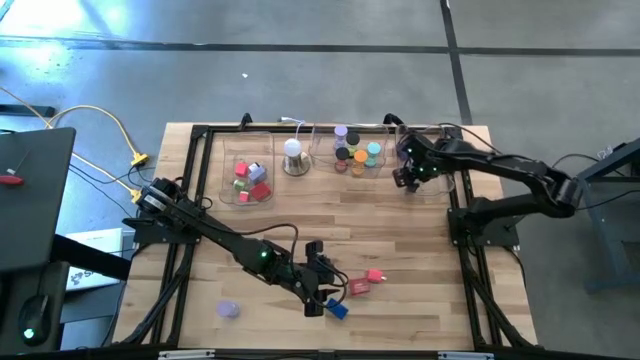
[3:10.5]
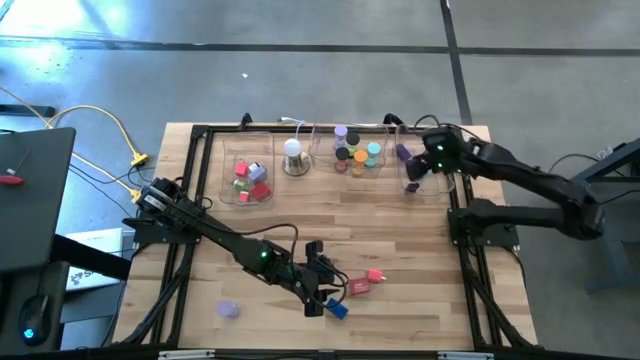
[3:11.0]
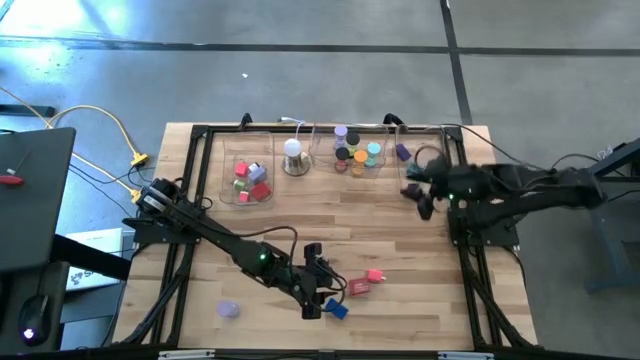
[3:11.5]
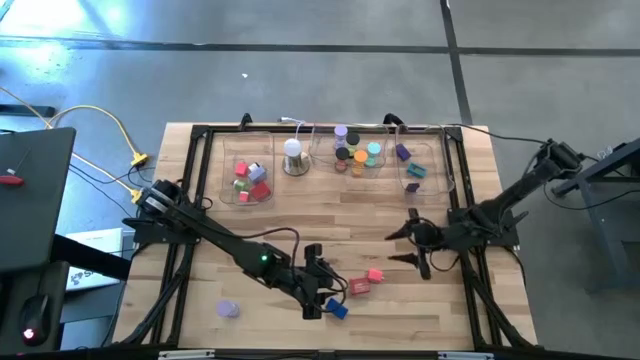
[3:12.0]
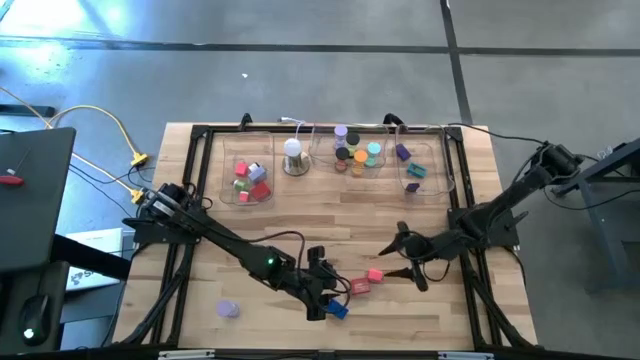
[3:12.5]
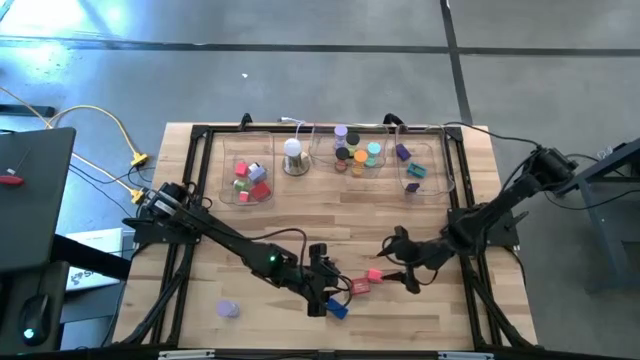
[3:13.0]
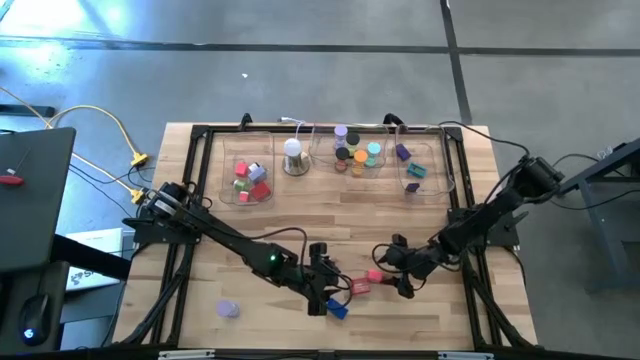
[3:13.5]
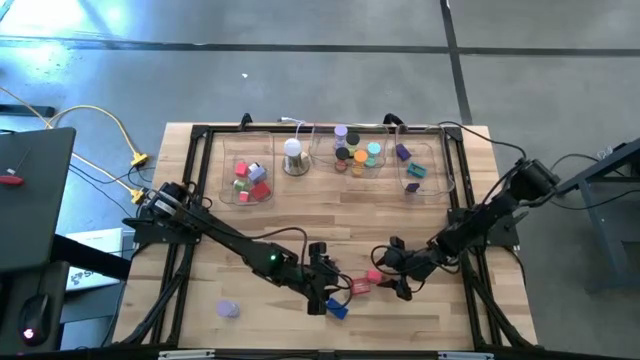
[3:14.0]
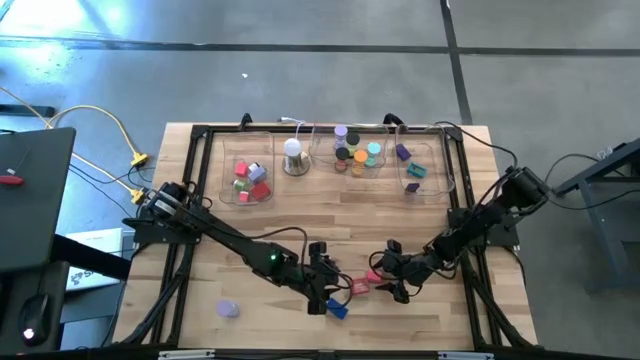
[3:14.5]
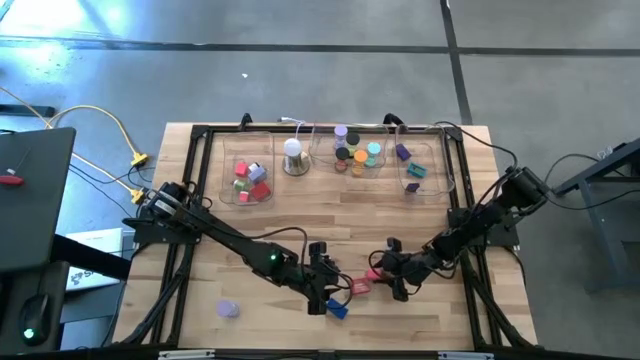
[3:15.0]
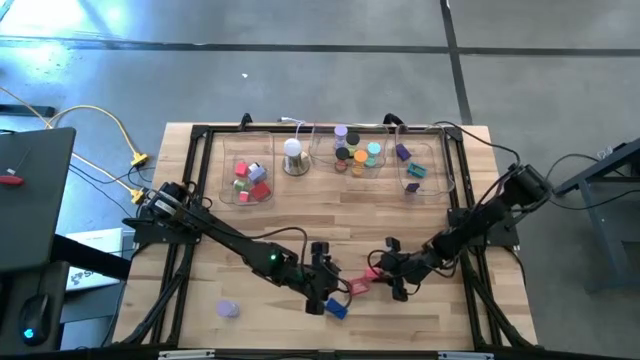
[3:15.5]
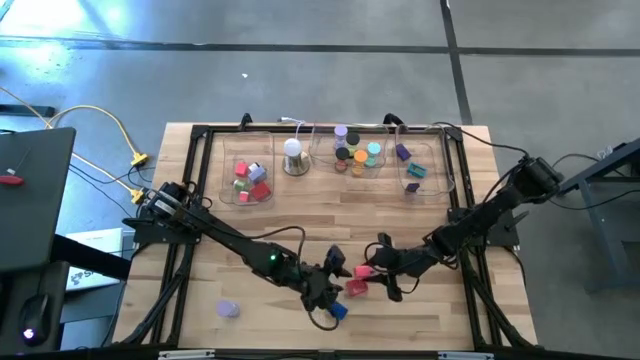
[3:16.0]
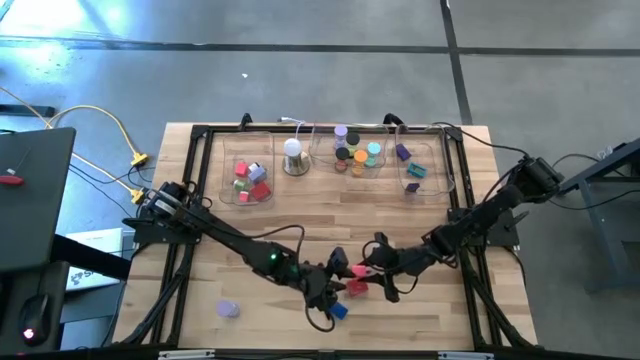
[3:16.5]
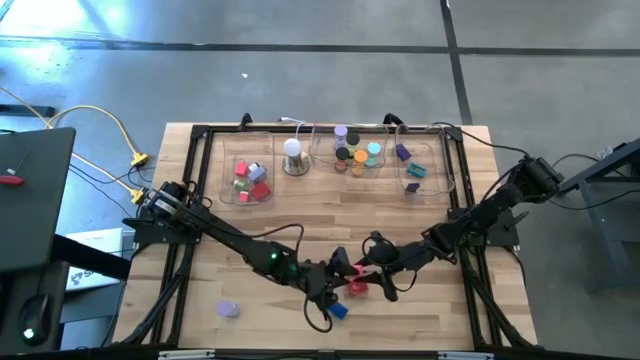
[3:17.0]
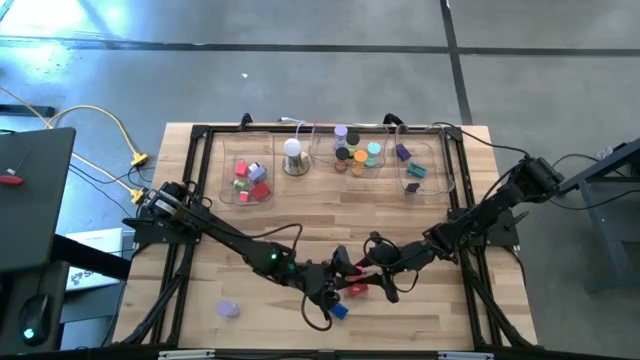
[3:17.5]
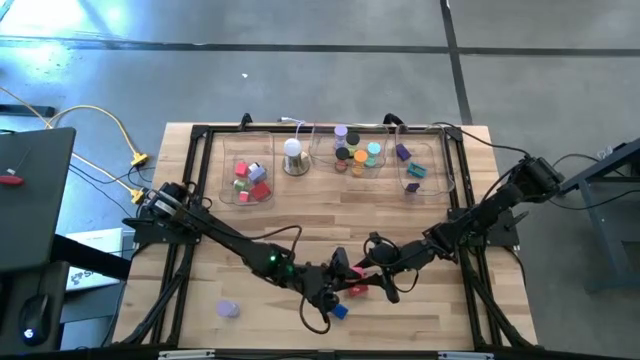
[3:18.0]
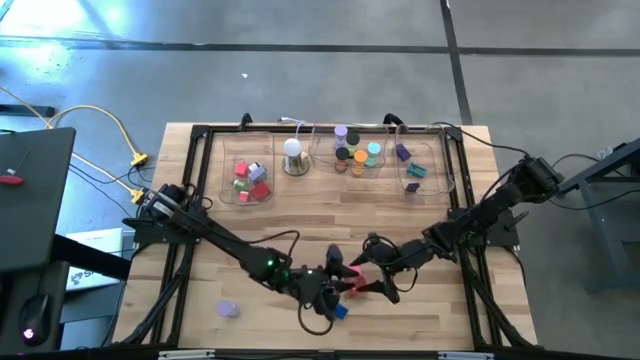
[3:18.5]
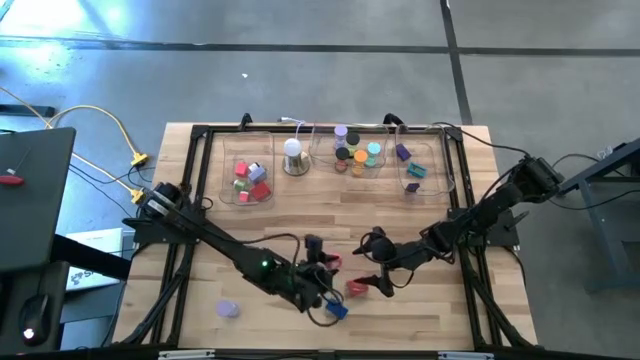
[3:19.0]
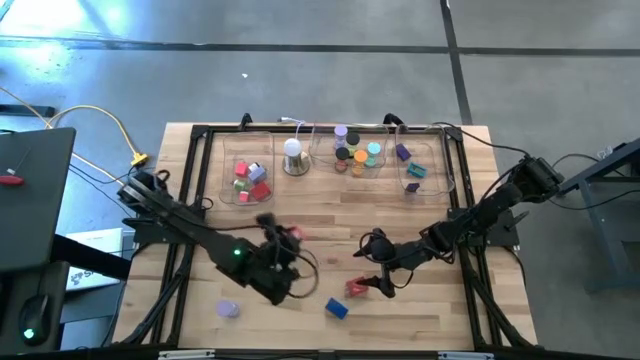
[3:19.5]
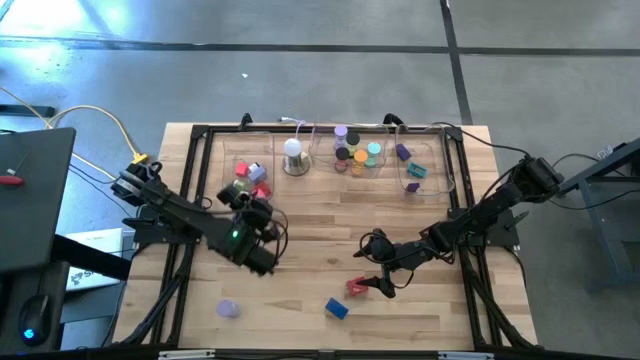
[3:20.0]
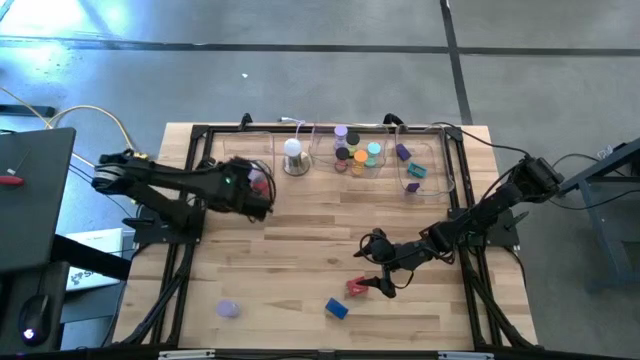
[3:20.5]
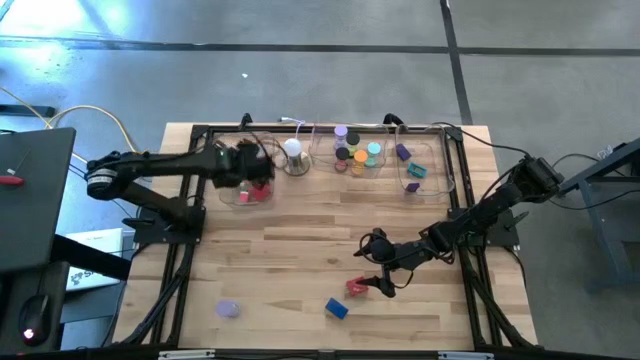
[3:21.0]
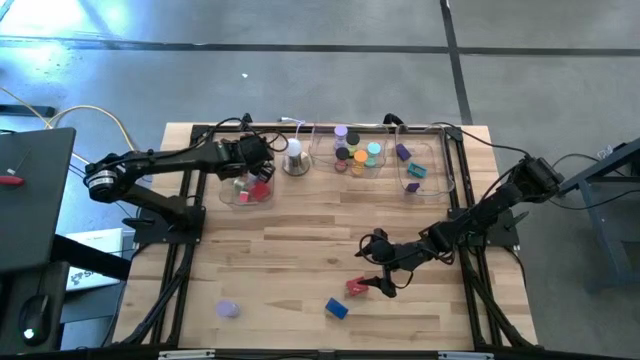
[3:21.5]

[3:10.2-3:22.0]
Task: Pick & Place Office items
Put the light pink charger adapter into the left transparent bin

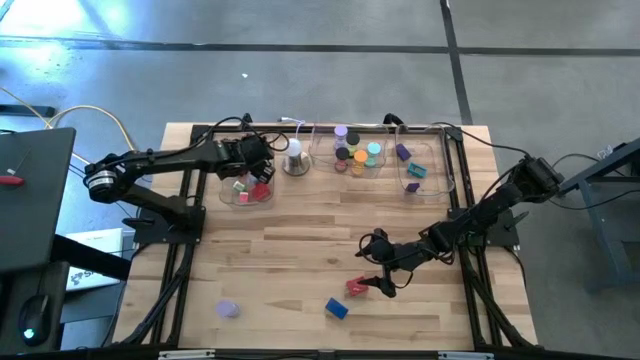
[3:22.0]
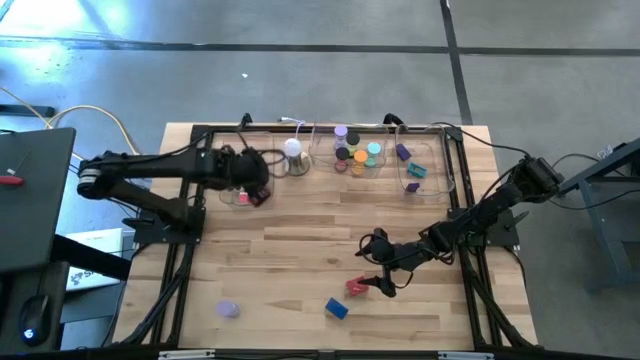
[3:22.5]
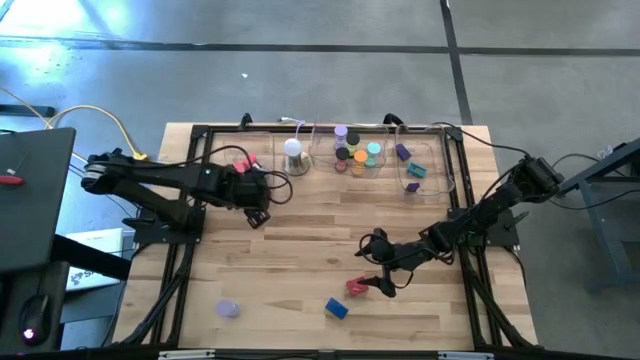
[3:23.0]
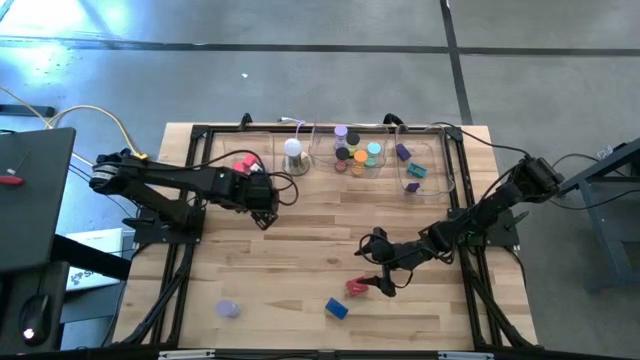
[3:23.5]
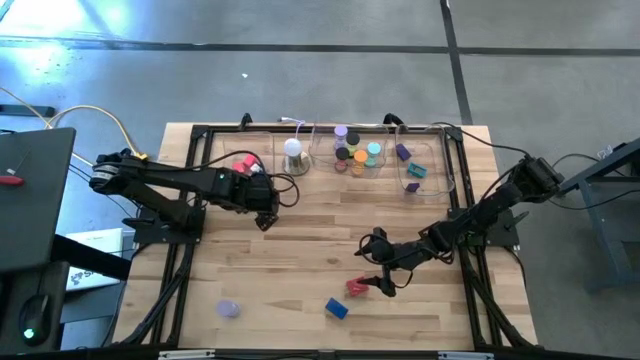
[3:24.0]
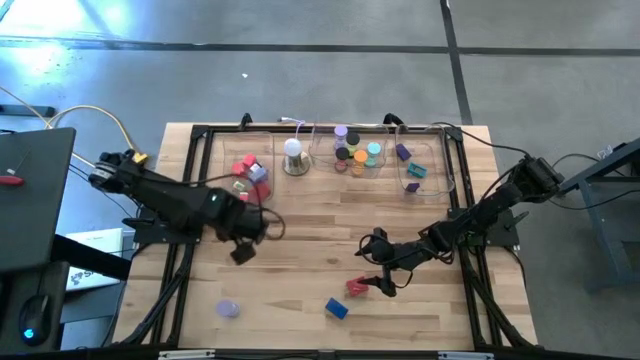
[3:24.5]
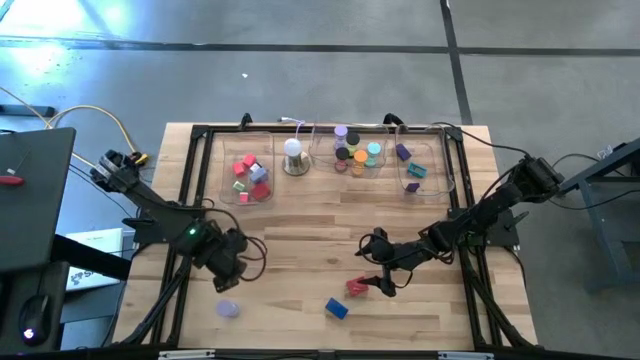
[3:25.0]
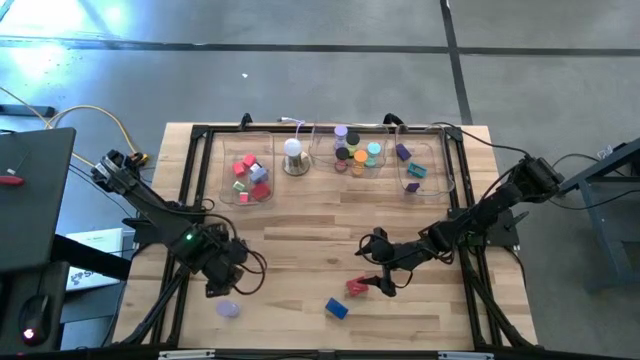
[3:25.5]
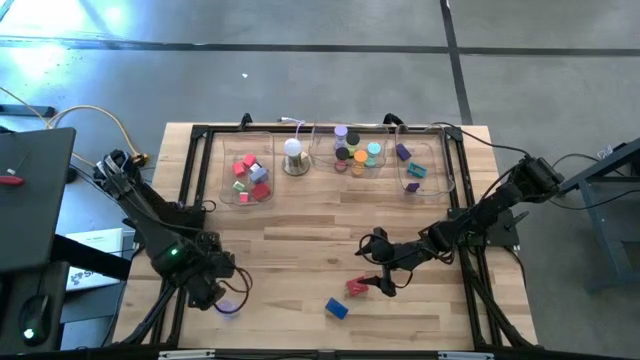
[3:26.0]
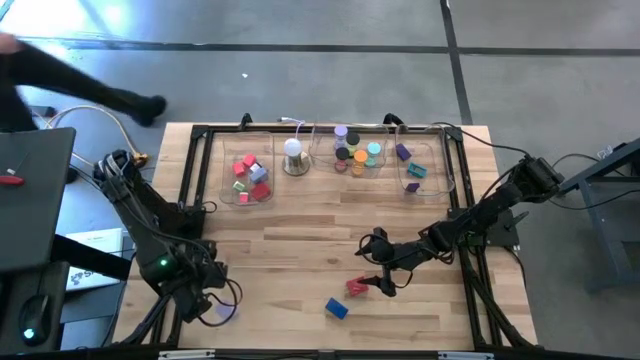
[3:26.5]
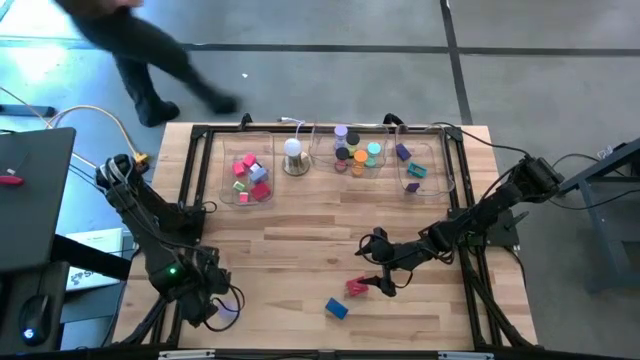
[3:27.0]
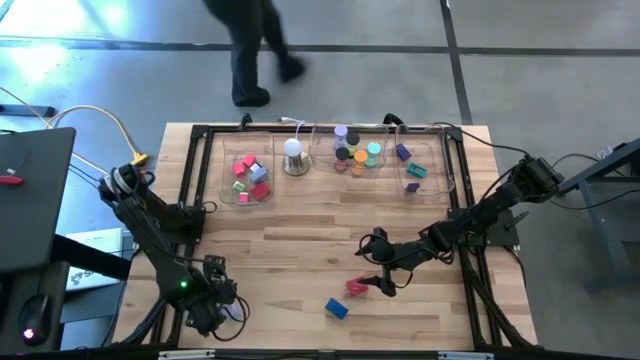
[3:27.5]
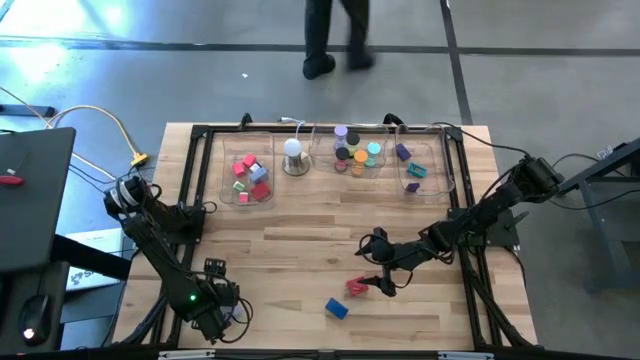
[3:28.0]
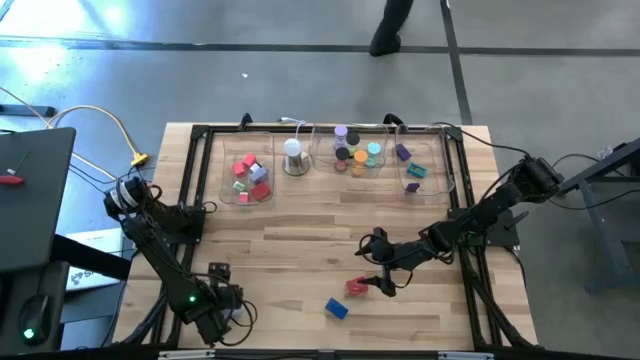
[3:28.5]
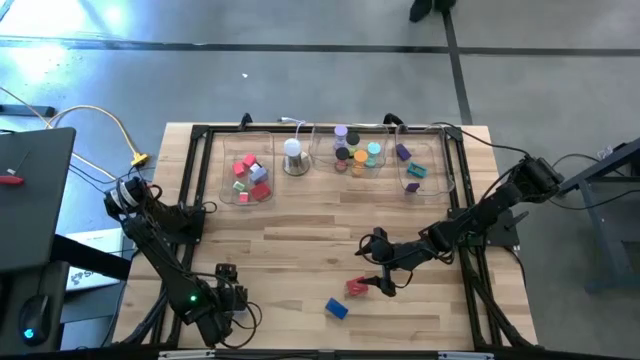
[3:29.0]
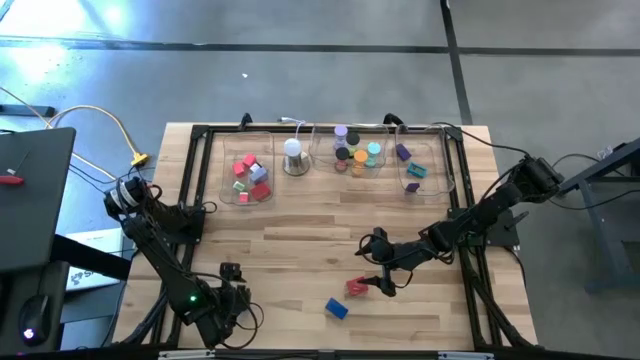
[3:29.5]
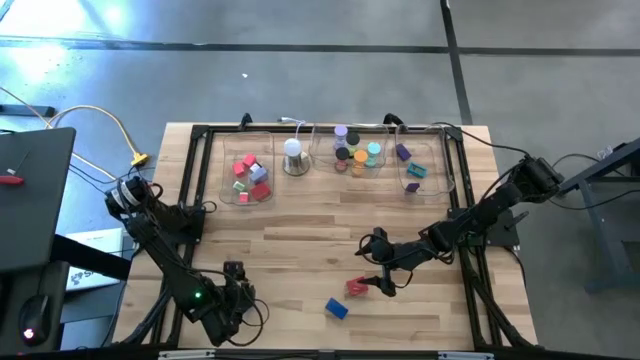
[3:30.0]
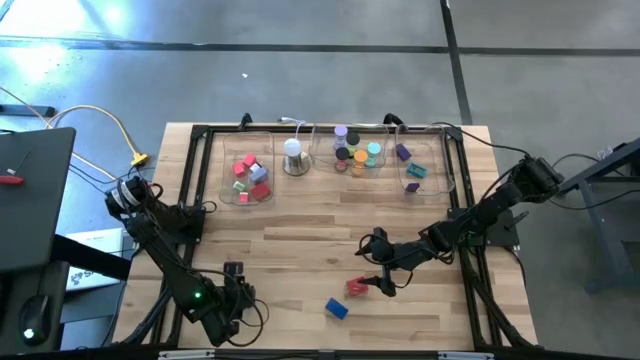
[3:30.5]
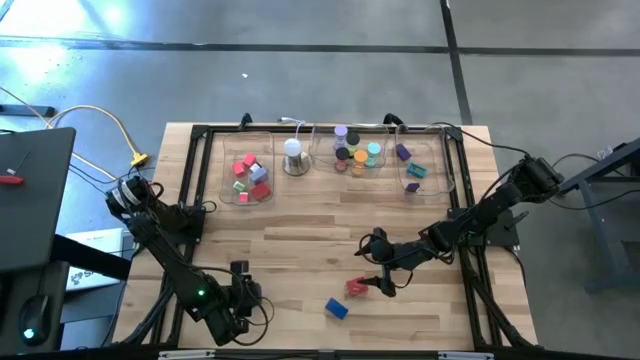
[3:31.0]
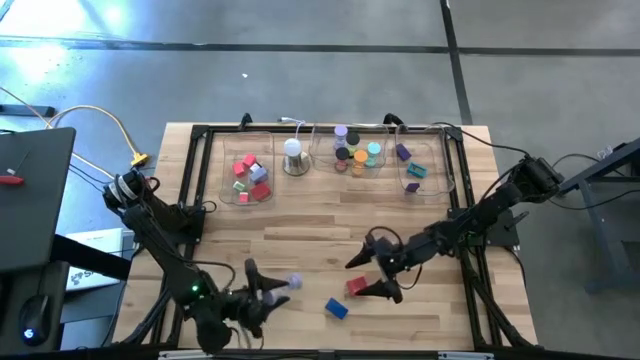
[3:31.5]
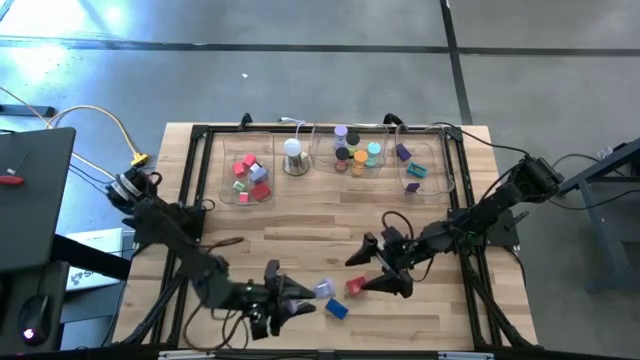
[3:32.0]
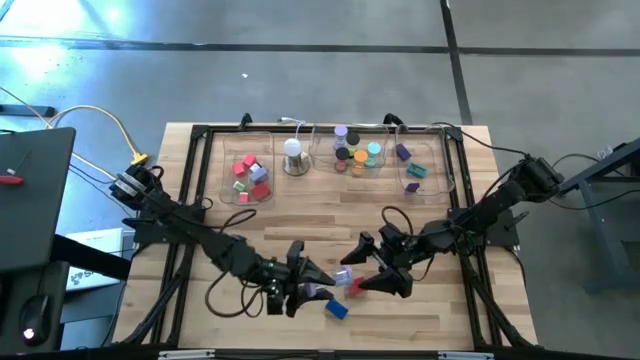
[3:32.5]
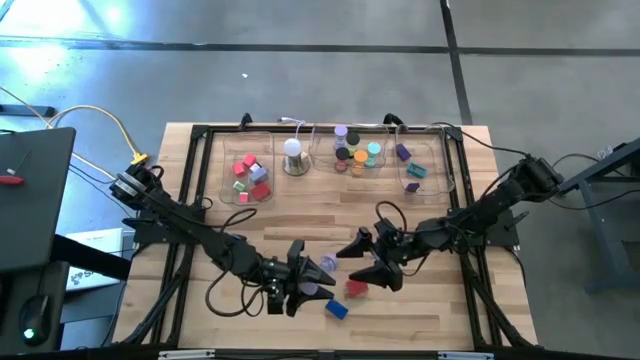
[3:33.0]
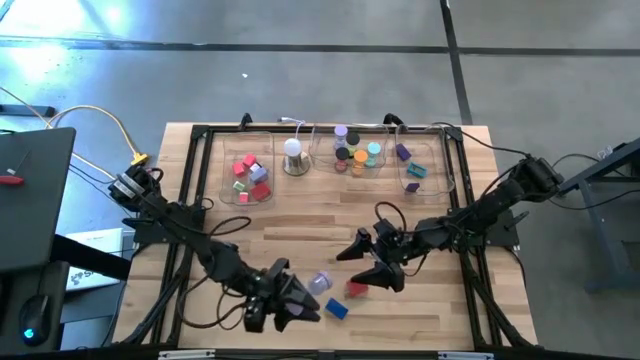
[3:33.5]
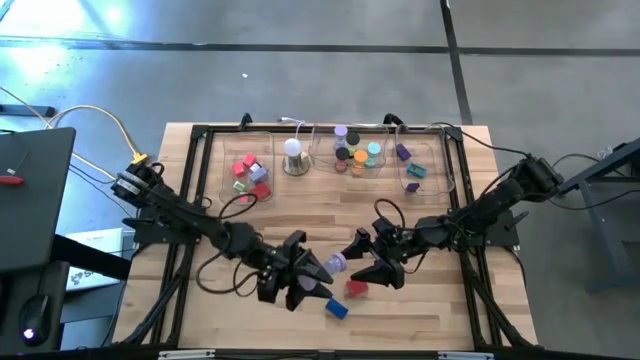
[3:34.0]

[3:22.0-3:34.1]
Put the purple hourglass into the middle transparent bin
